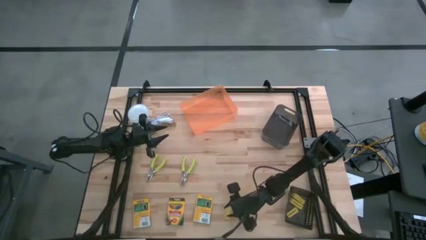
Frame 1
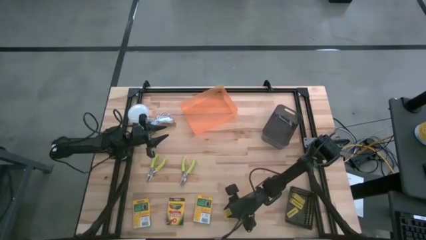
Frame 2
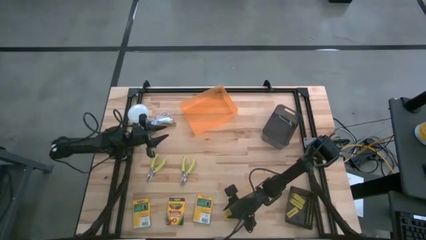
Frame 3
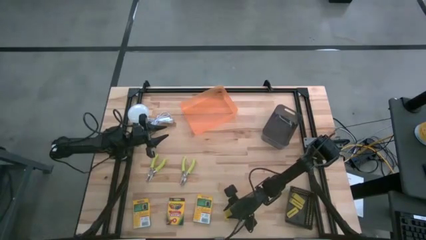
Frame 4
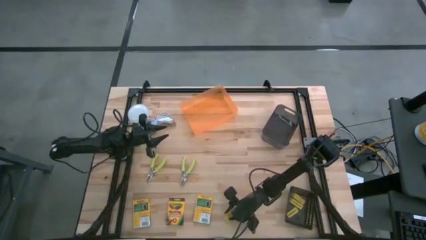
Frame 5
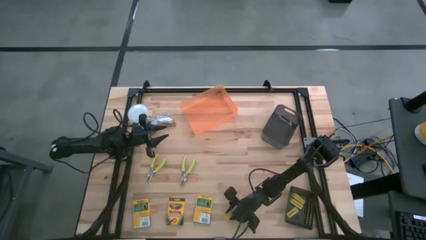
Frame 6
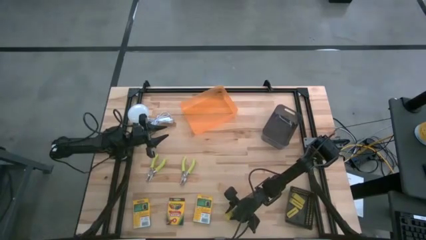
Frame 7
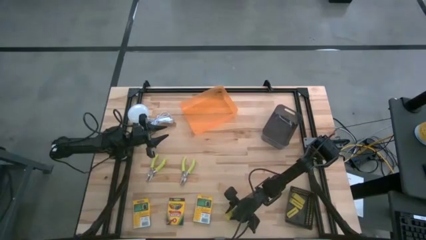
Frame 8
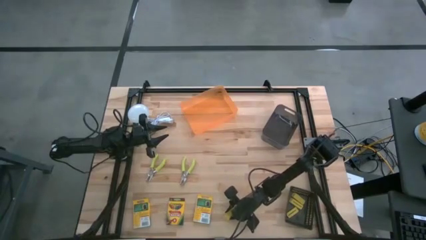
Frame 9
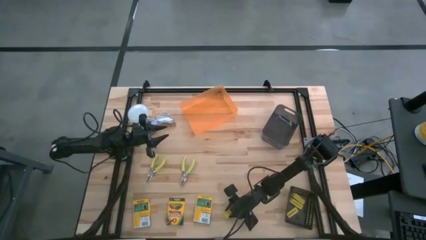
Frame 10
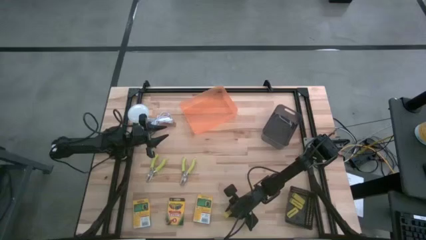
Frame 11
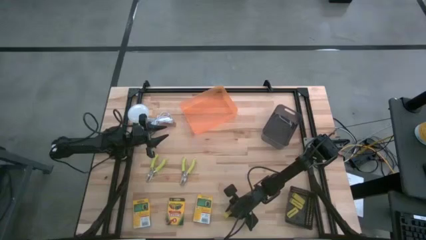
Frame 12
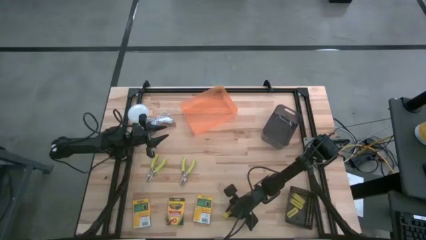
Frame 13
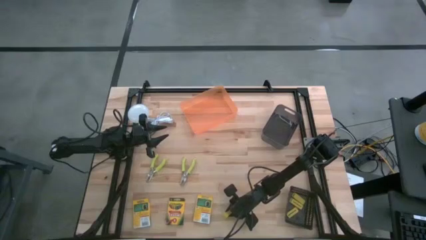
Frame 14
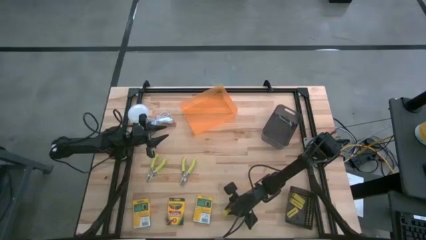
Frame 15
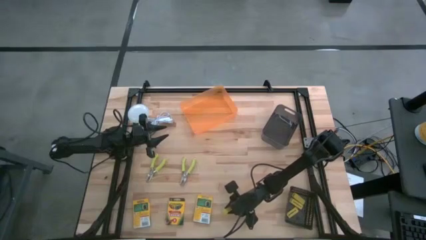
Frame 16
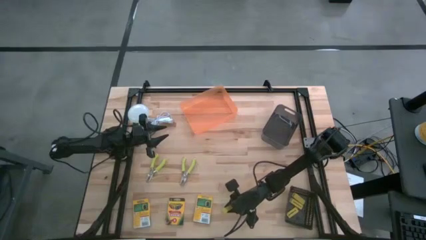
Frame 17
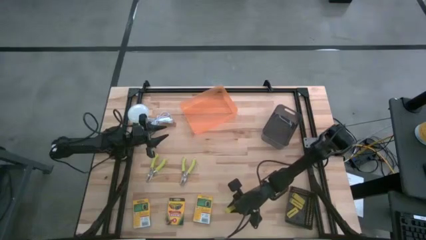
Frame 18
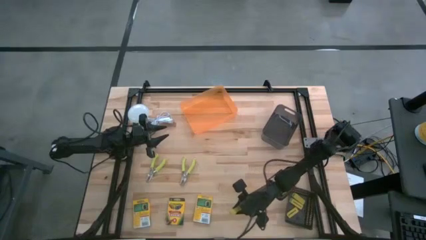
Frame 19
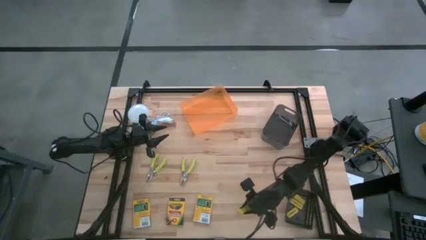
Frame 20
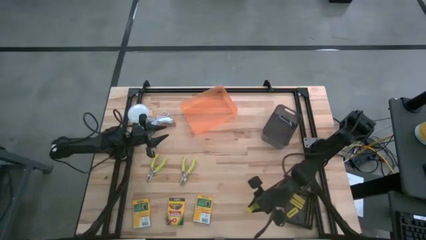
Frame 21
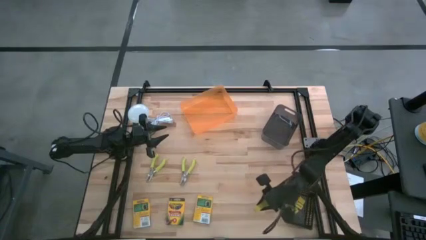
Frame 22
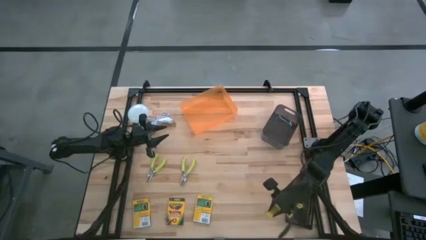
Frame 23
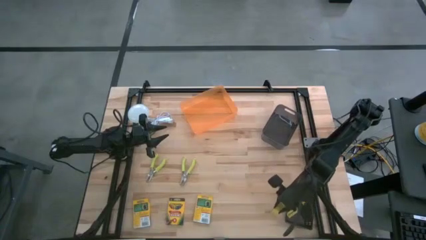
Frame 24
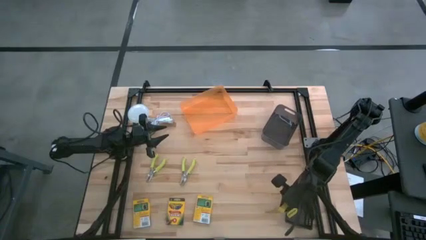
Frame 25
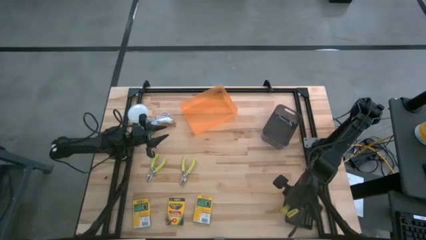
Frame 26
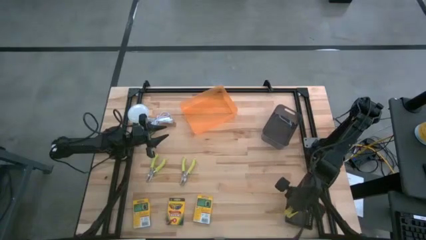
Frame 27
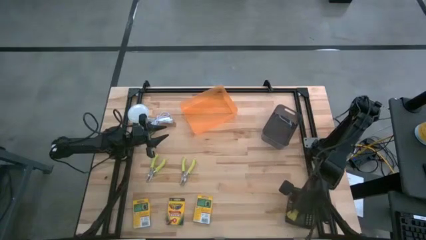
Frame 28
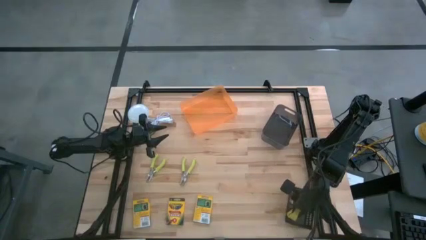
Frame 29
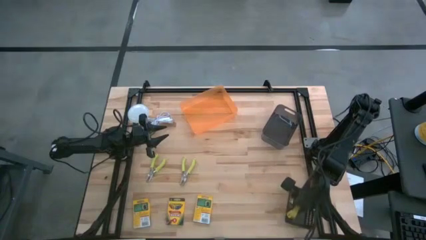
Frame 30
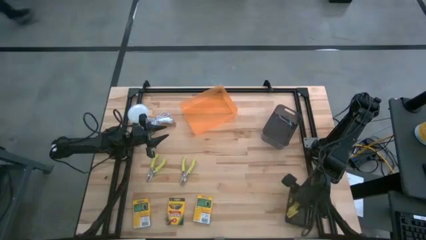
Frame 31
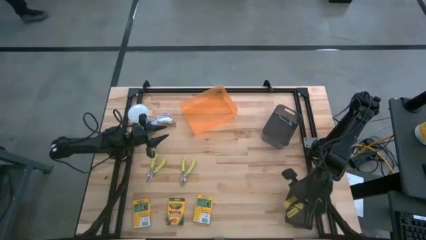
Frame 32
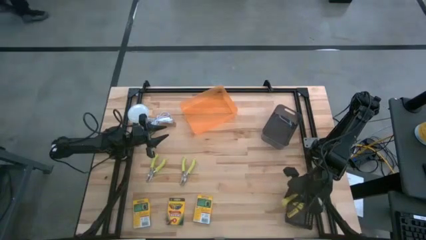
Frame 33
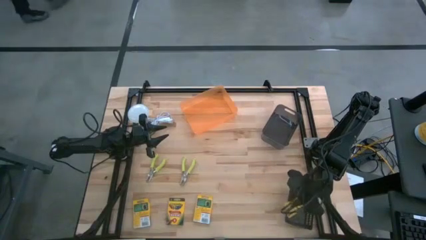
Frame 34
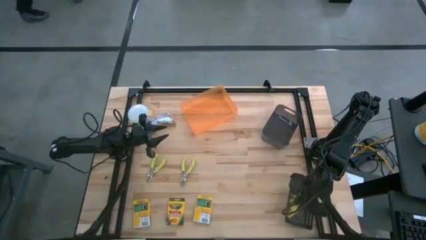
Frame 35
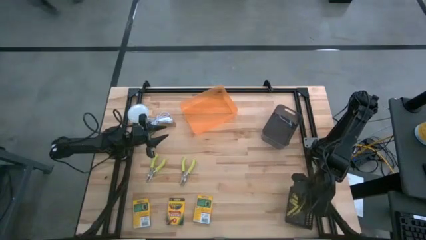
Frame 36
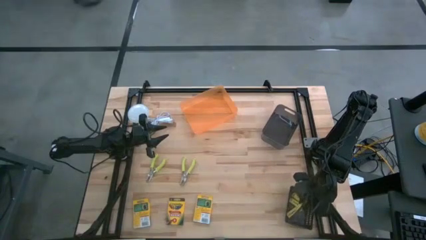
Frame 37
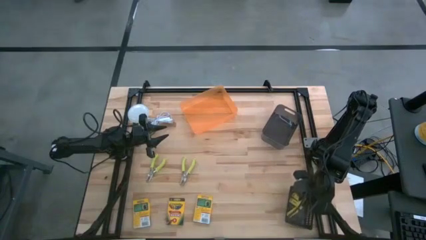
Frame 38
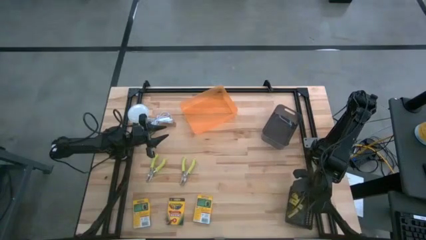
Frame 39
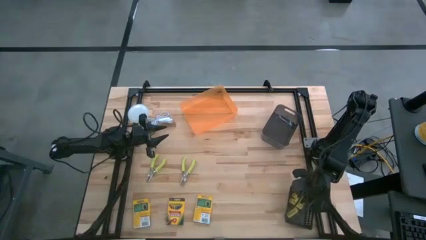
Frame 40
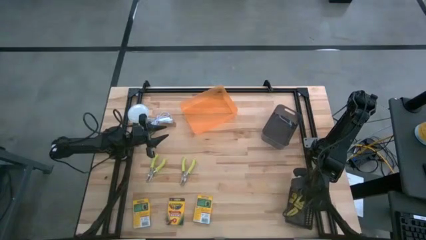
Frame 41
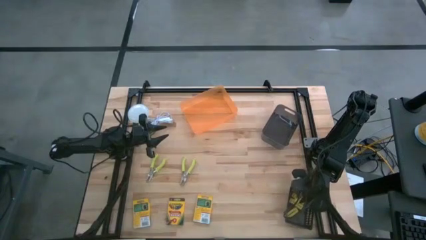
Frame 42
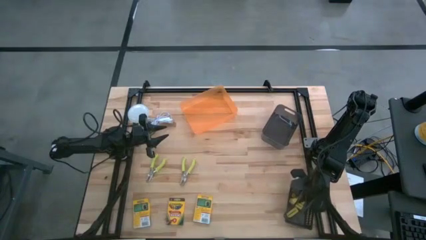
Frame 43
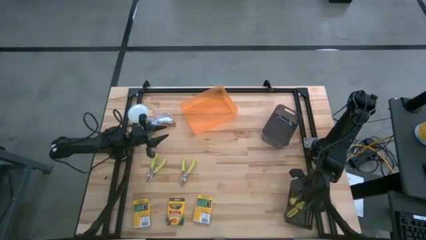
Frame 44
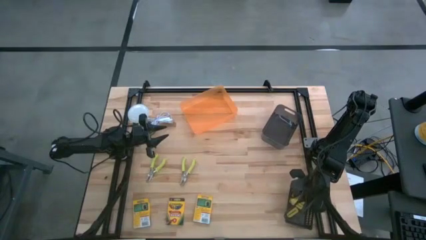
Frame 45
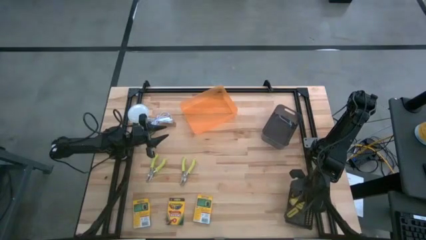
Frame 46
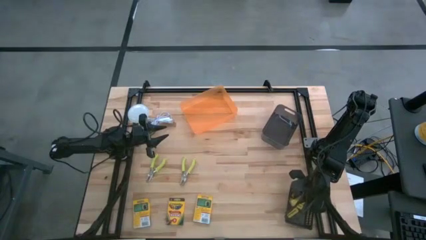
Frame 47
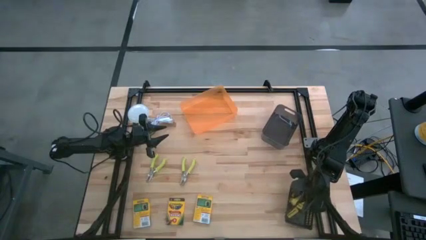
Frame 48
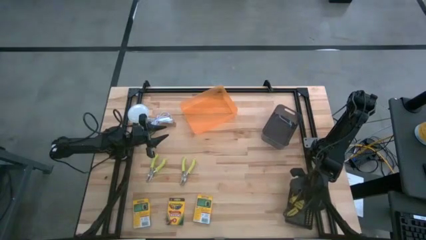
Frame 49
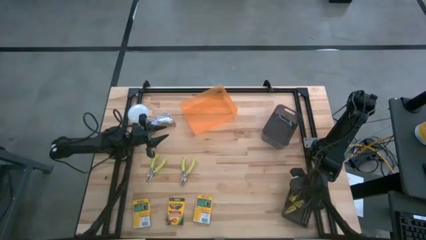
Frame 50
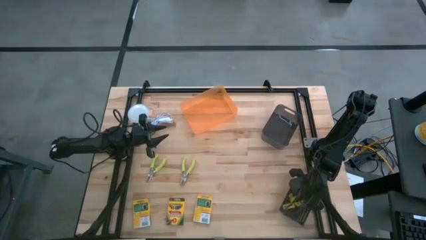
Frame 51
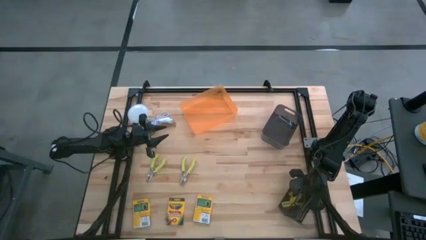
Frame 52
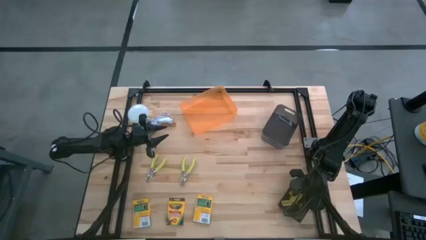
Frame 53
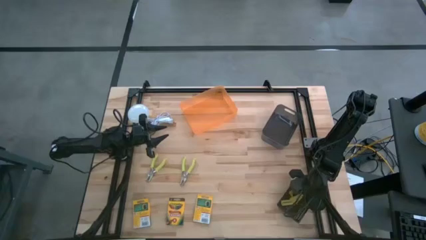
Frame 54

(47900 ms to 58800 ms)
Task: Pick & Place School Supplies
Put the yellow eraser into the black basket

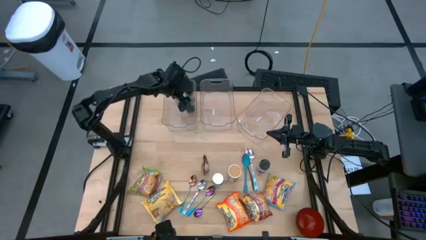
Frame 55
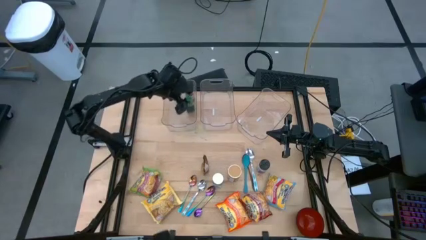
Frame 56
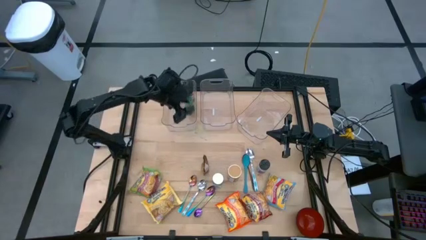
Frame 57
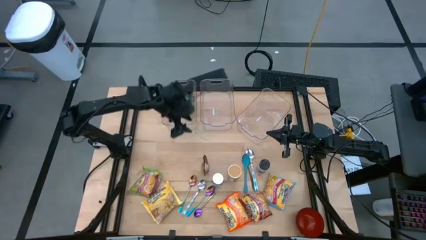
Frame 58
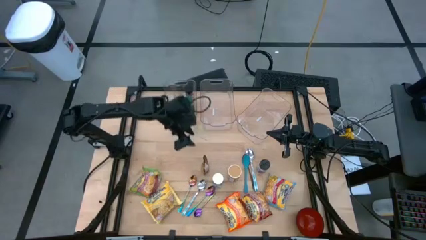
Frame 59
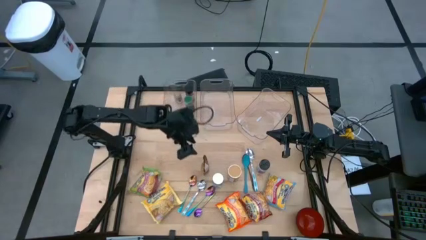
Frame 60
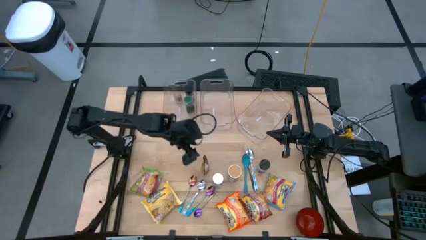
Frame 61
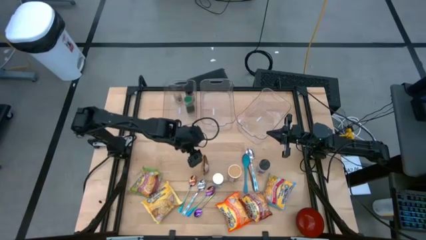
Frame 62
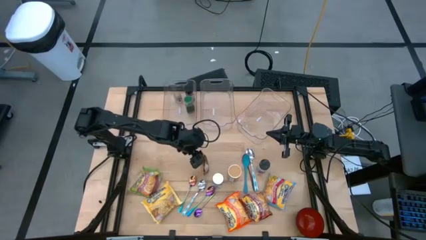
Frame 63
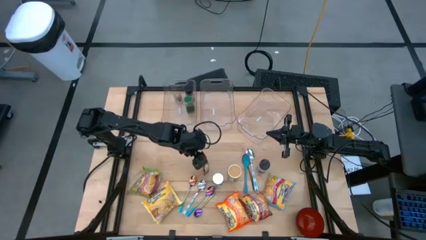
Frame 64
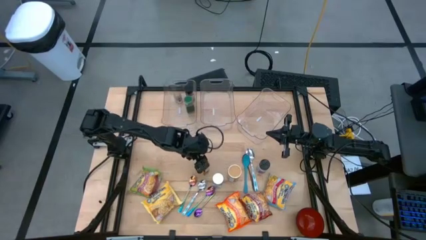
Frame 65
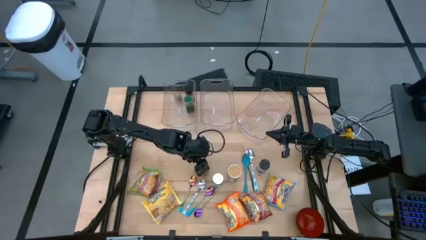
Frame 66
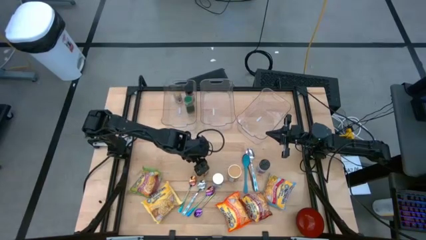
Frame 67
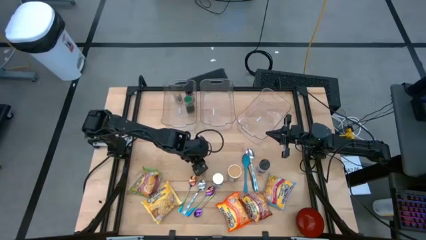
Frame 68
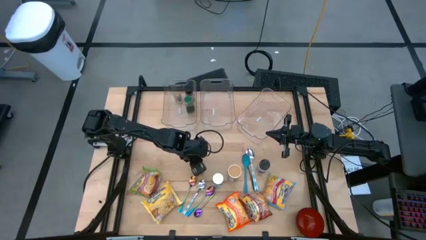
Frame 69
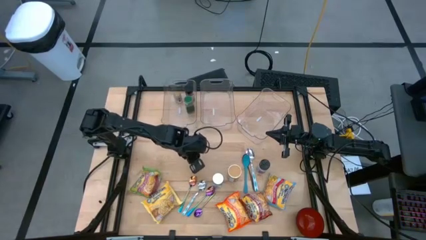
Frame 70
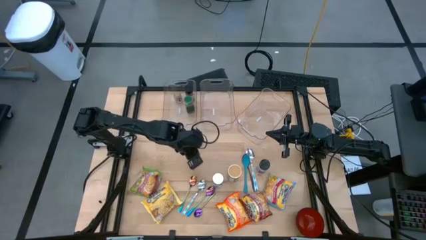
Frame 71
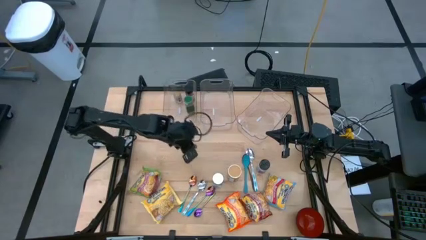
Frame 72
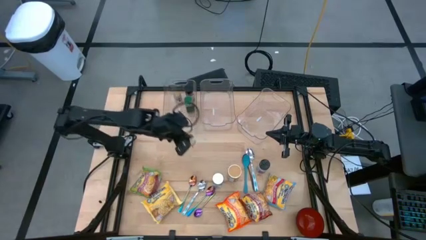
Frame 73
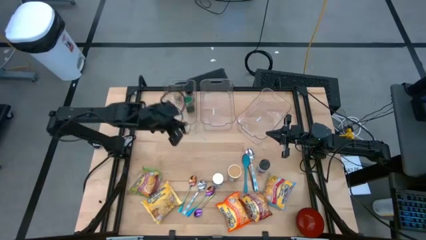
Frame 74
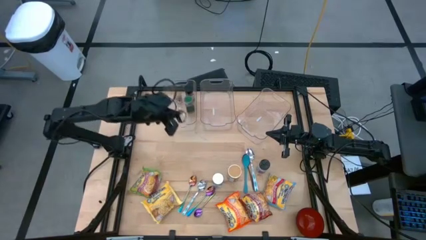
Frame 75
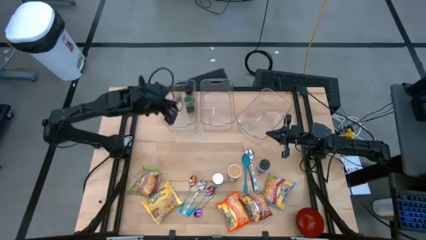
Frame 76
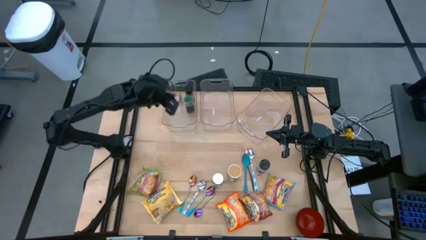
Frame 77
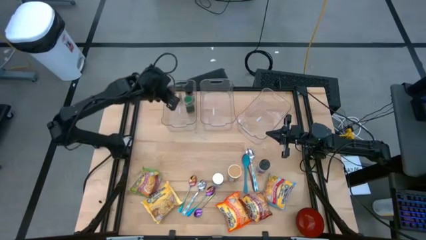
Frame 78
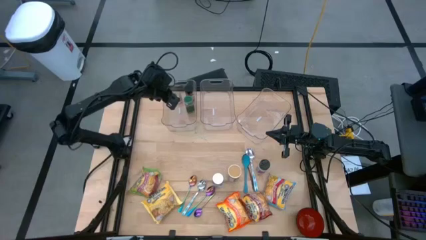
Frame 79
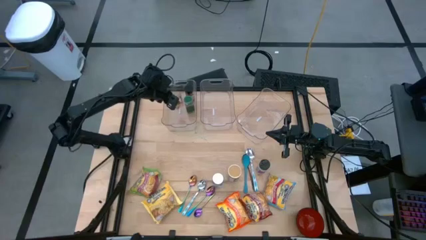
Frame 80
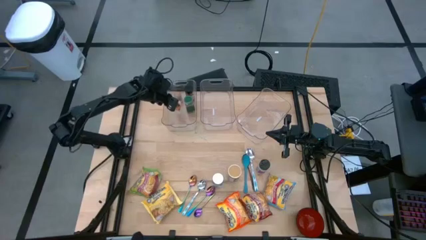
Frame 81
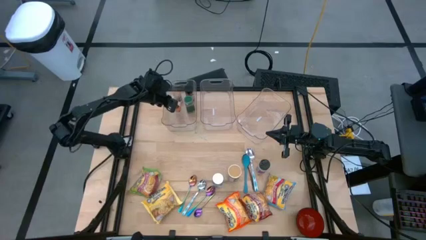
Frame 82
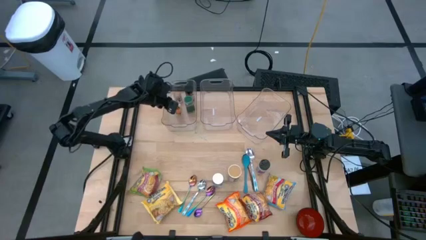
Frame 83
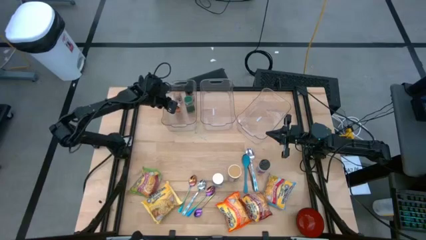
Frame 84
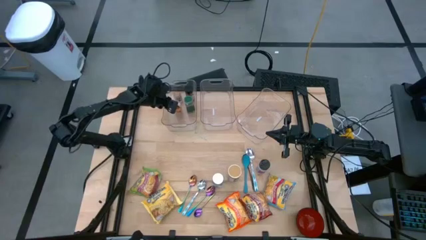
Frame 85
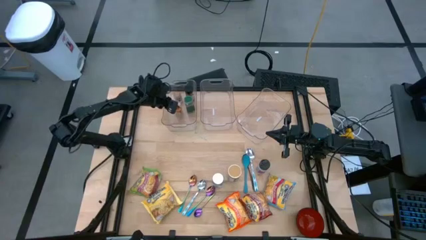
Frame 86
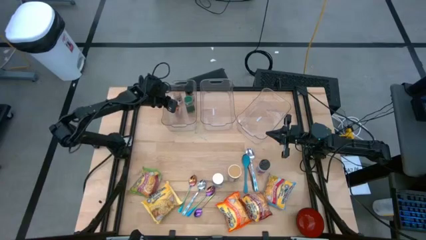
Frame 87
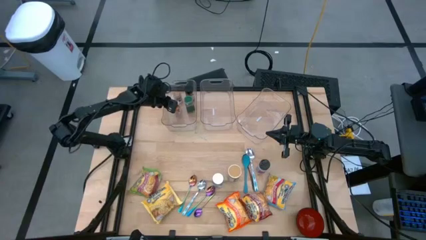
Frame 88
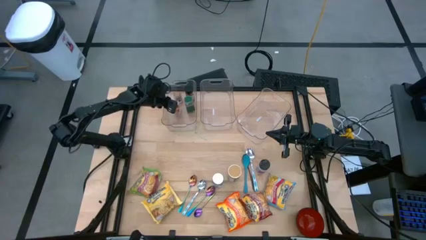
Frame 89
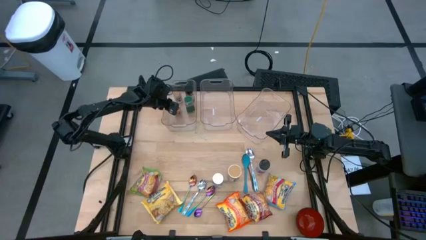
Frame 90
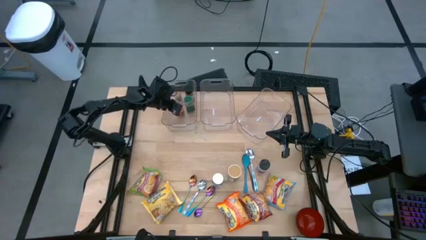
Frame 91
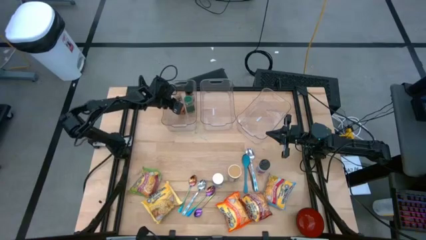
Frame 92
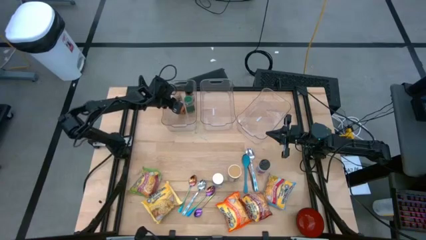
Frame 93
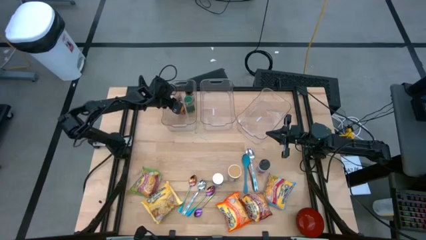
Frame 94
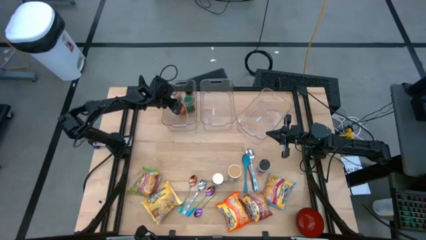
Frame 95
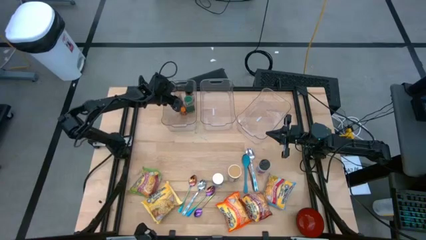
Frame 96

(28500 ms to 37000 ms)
Task: Pick & Place Food Item
Put the orange seasoning pack into the left transparent bin
